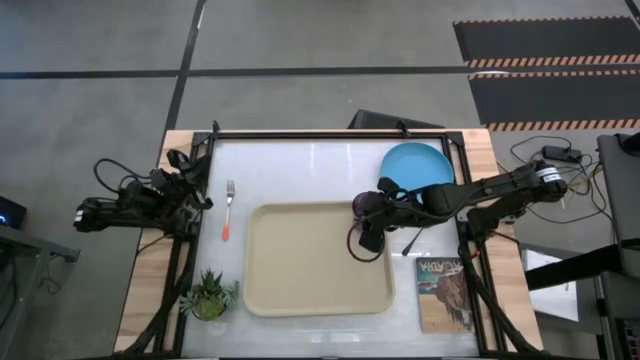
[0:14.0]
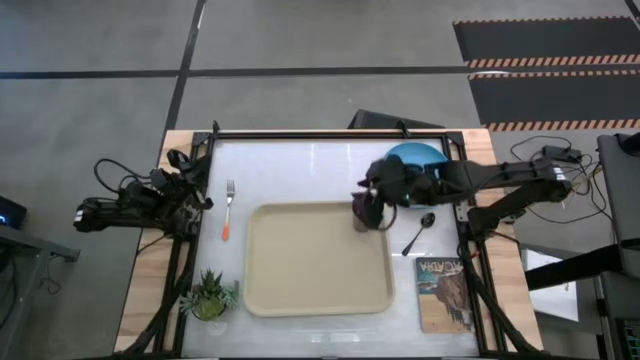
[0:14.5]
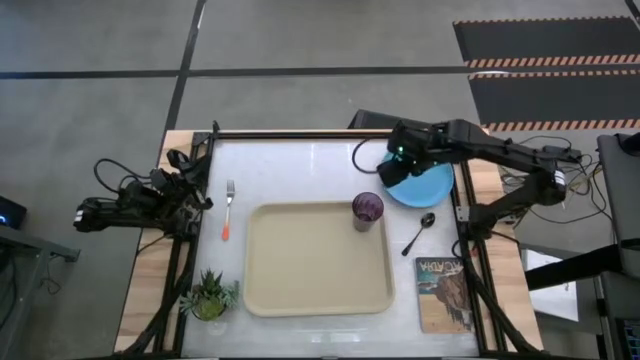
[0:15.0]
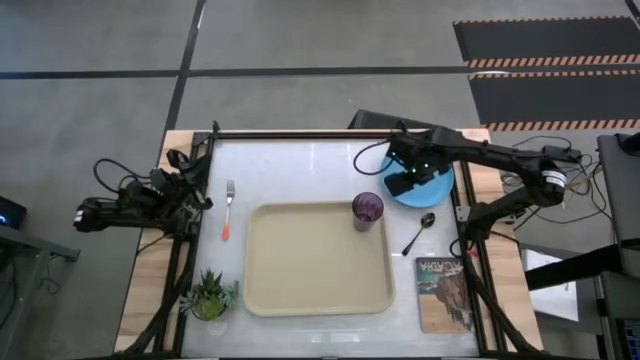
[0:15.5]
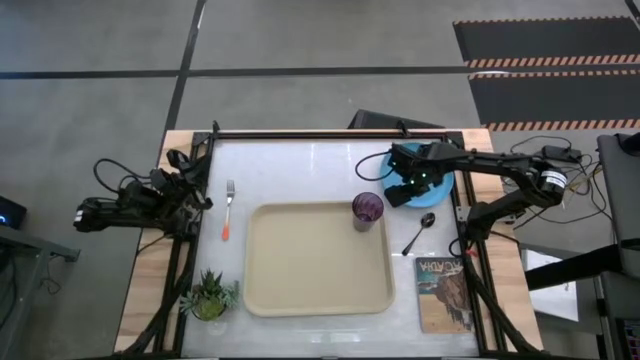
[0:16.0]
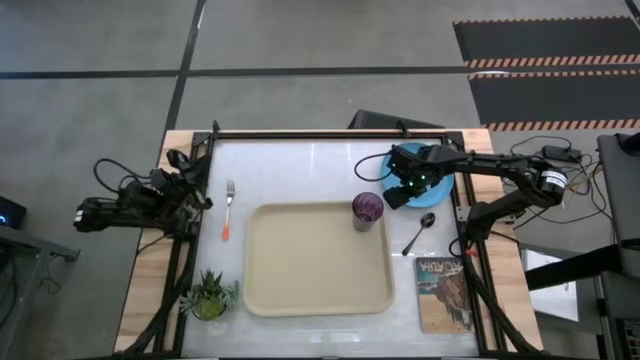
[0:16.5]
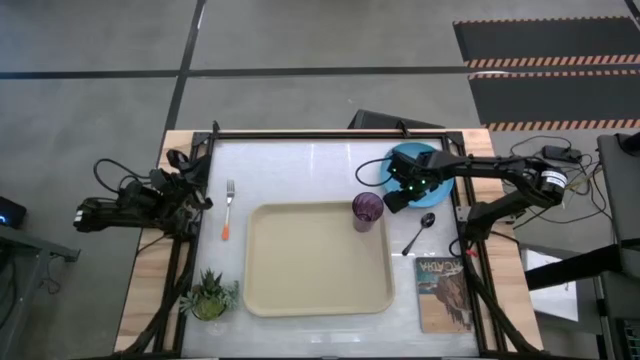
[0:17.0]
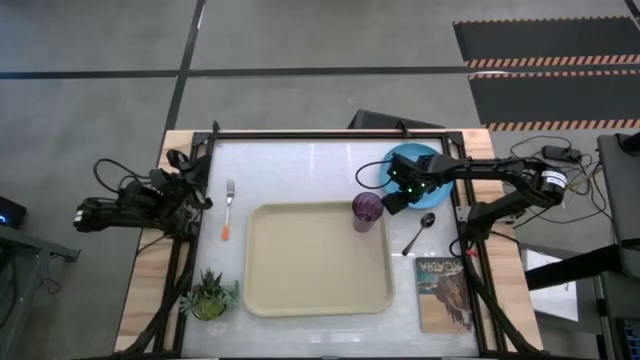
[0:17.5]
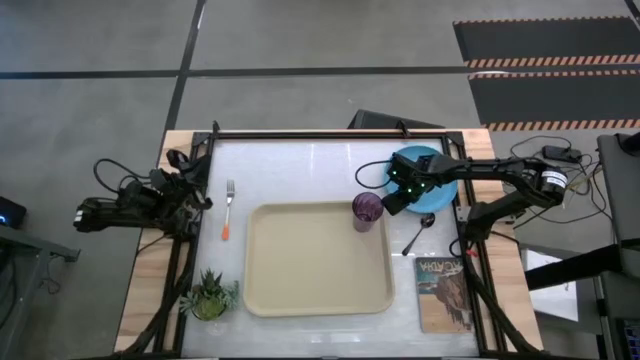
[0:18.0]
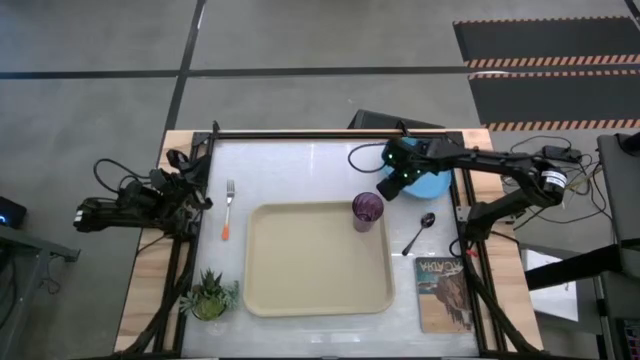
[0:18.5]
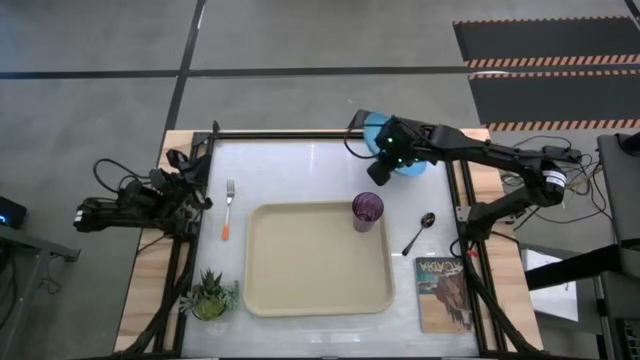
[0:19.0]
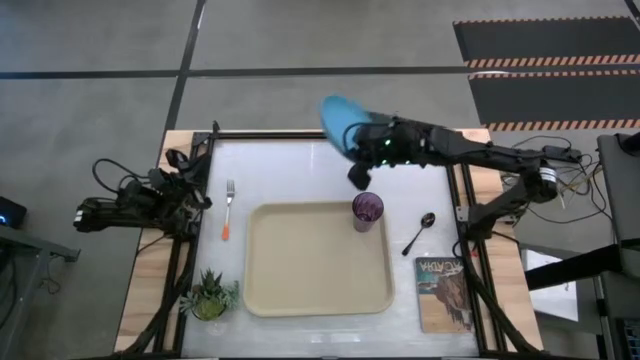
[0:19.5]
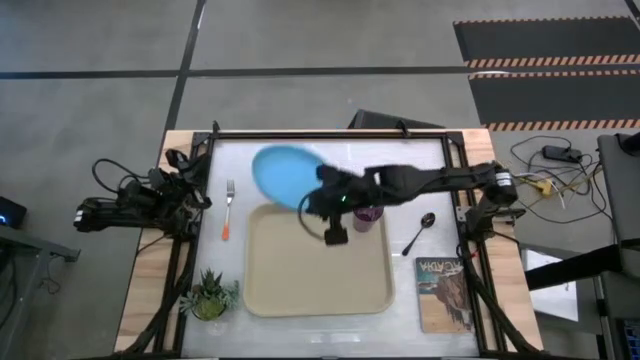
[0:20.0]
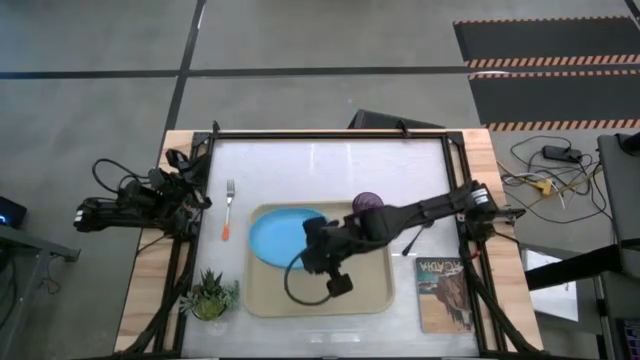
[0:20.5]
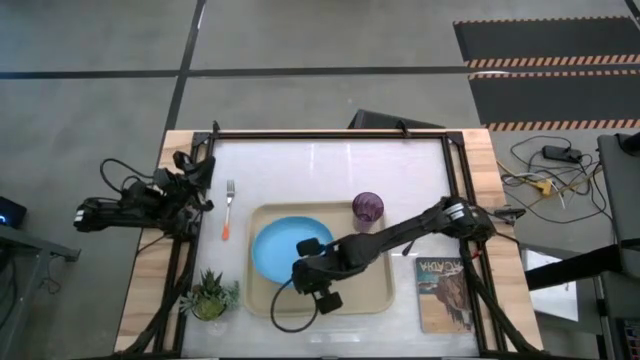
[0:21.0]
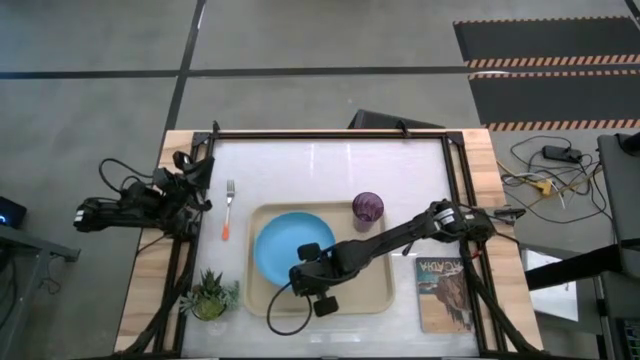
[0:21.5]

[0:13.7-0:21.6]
Task: Pick and place plate/cup/fork/spoon on tray
Put the blue plate on the white tray to the bottom right of the violet cup

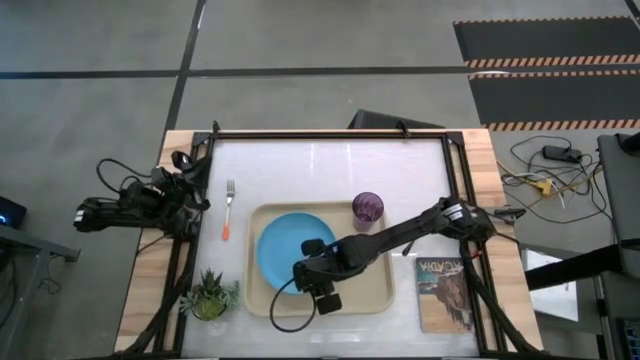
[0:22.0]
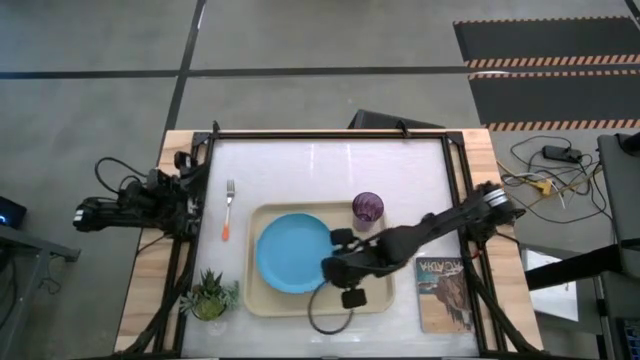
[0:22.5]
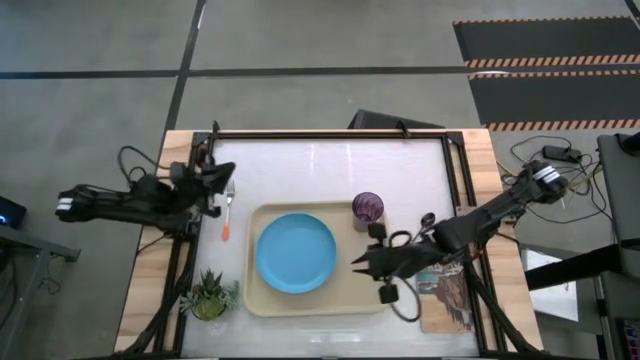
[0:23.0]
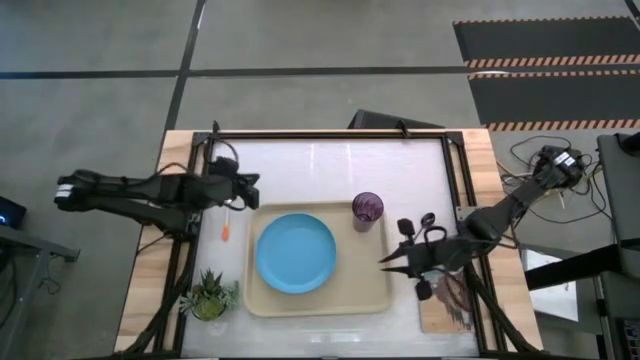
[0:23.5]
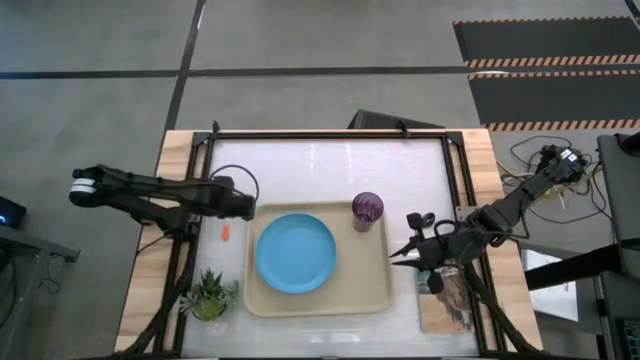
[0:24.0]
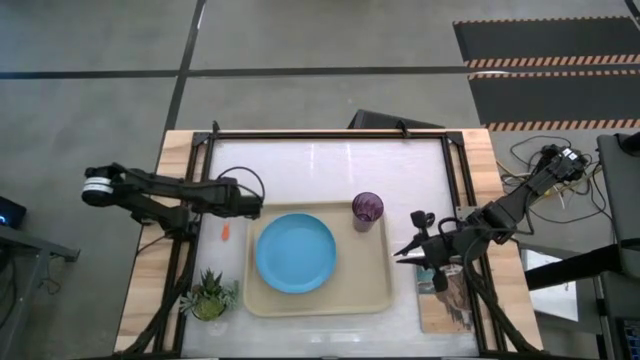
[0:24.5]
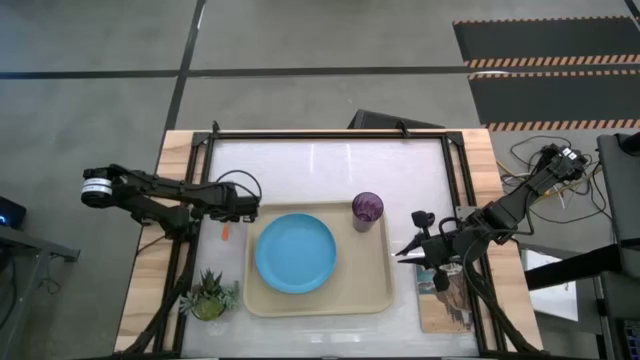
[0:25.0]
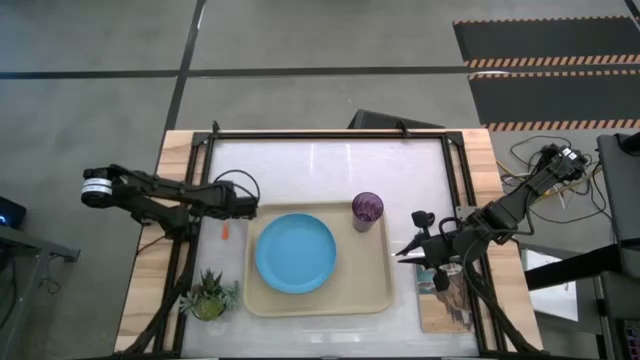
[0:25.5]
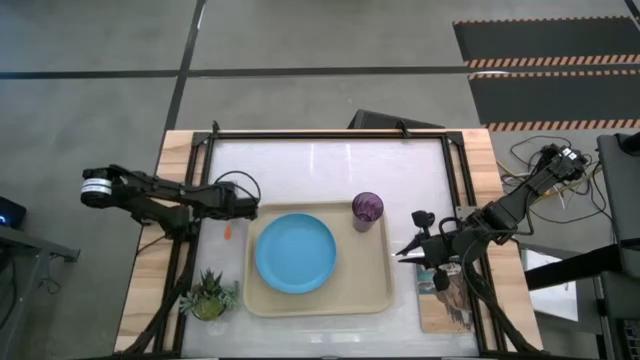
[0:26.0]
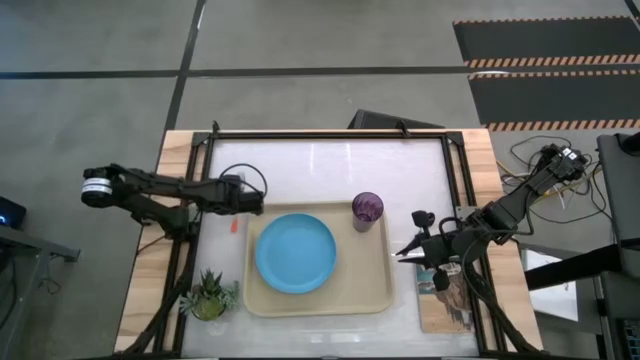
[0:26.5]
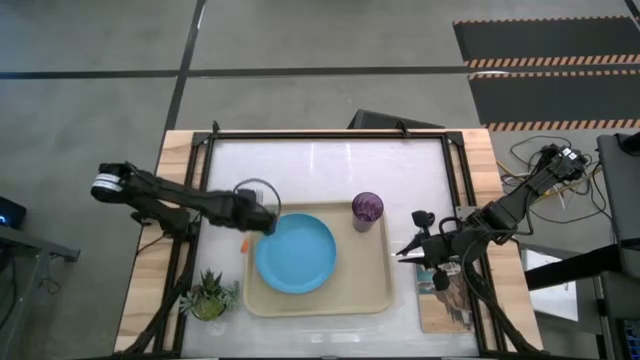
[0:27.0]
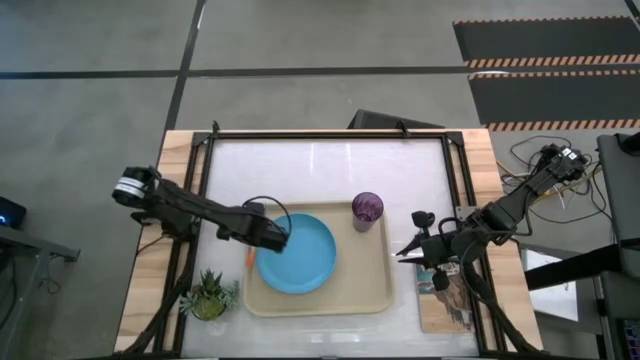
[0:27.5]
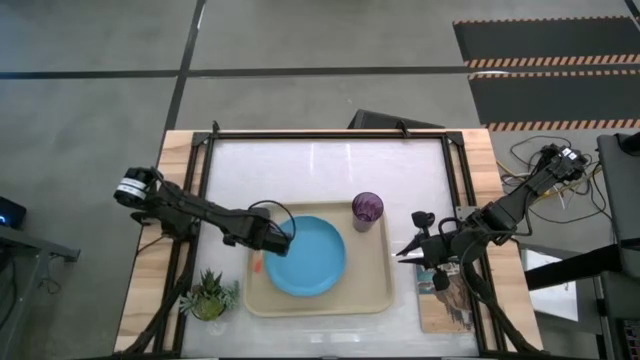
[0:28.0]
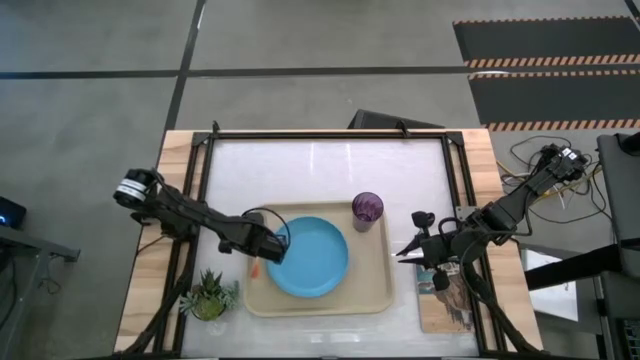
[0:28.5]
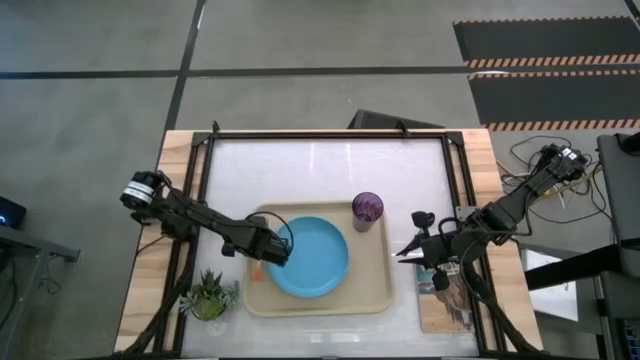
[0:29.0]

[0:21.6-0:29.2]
Put the orange fork on the white tray to the left side of the blue plate

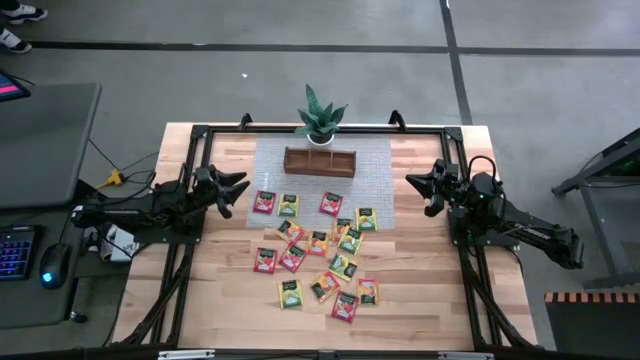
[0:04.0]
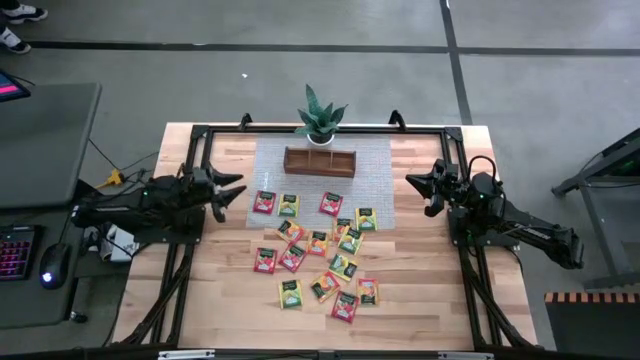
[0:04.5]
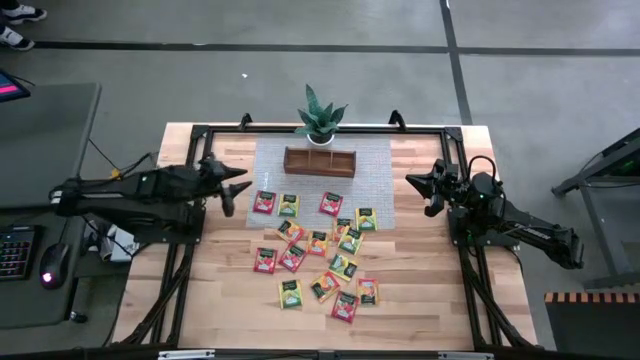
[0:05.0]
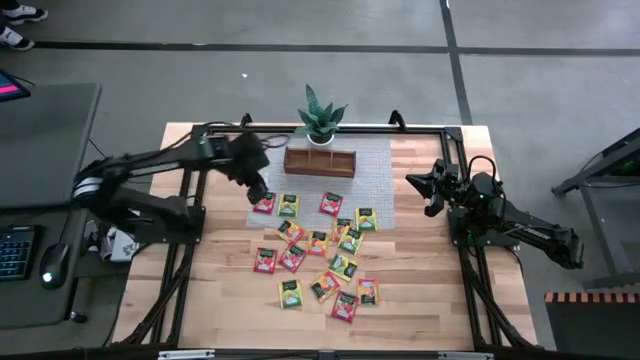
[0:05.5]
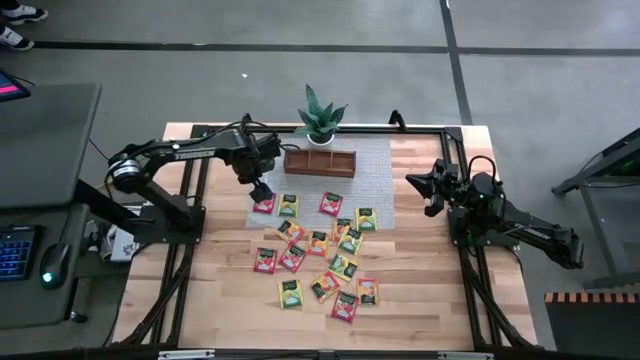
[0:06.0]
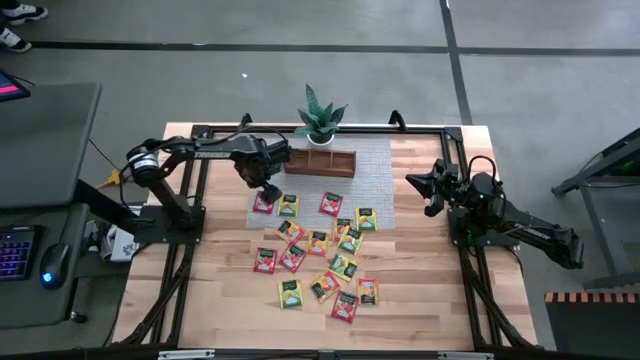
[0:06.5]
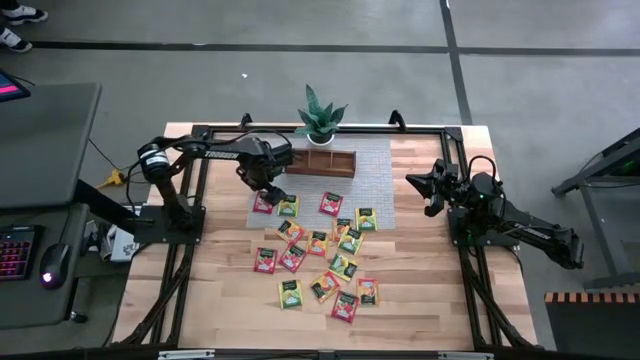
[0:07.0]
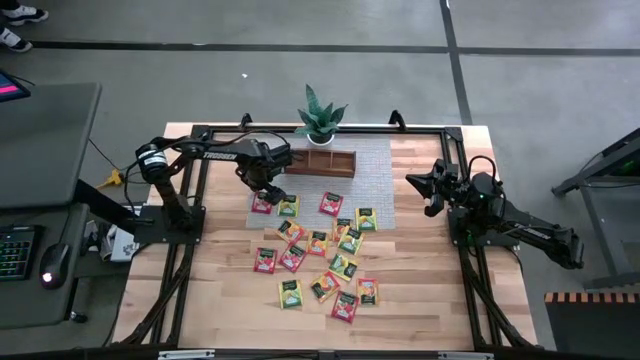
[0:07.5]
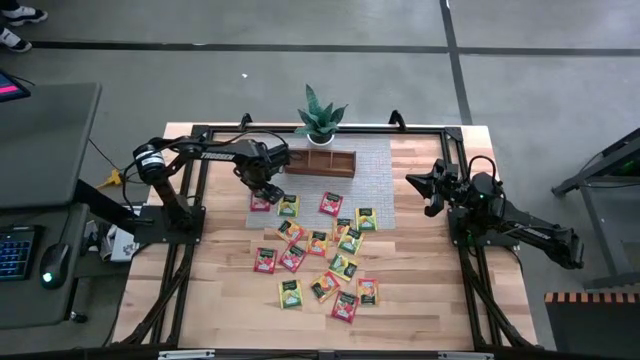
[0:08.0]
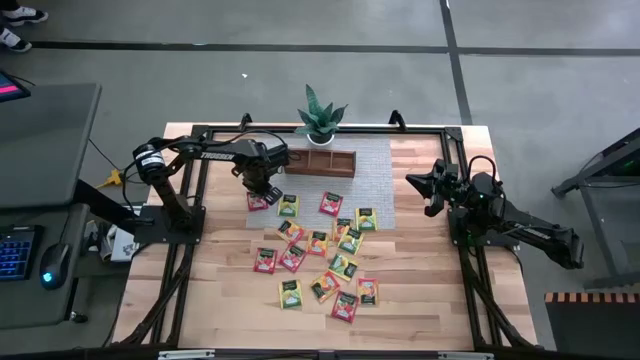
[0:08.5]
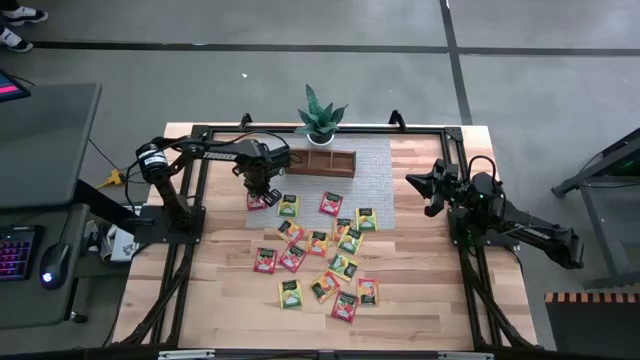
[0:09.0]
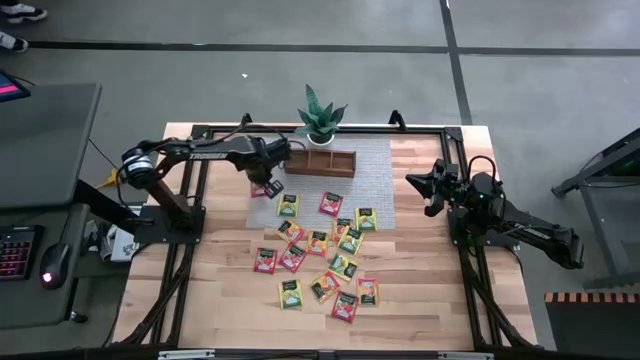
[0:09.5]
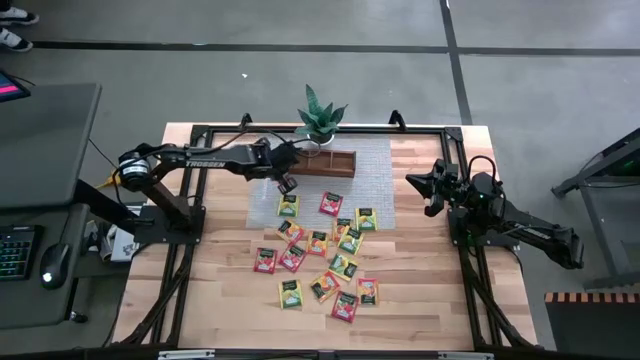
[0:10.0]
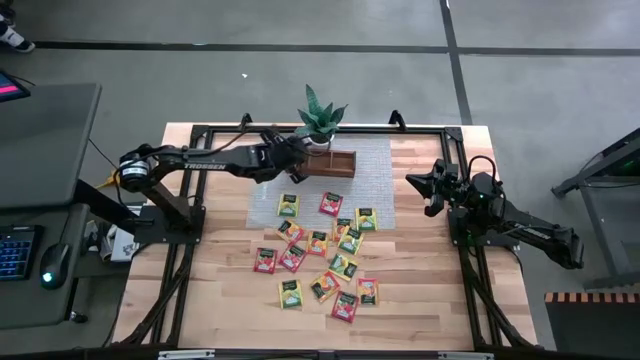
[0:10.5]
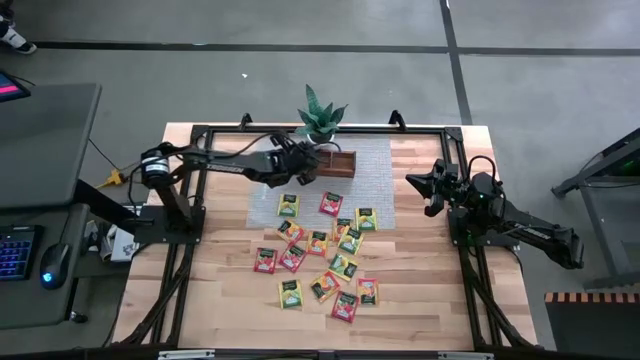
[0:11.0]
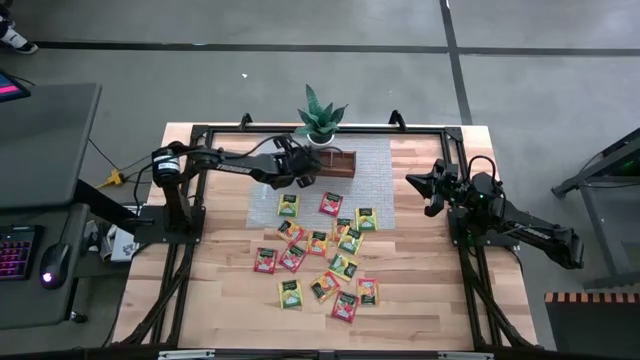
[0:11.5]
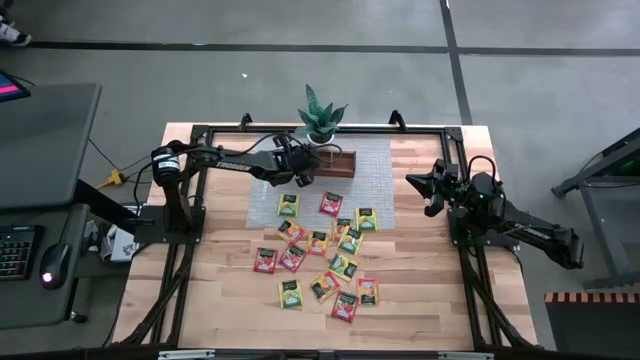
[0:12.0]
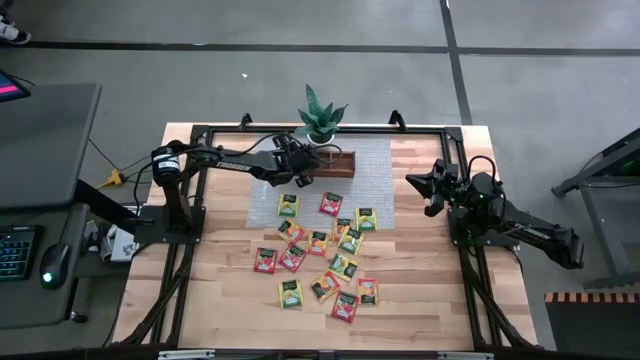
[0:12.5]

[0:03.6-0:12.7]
Task: Pick & Place Tea
Put the red tea bag into the left section of the wooden organizer
